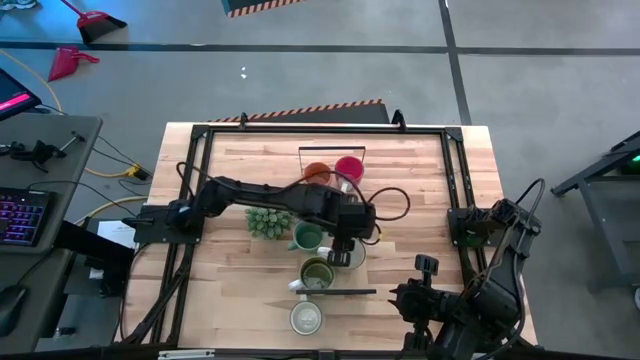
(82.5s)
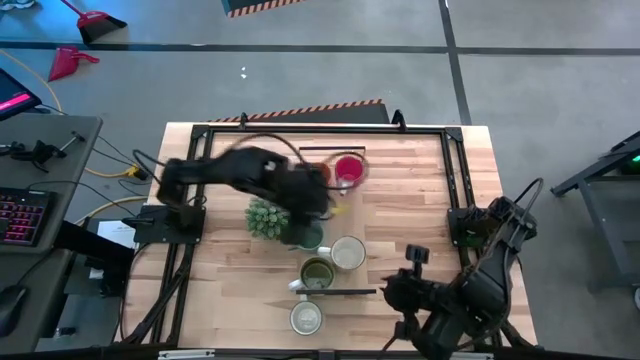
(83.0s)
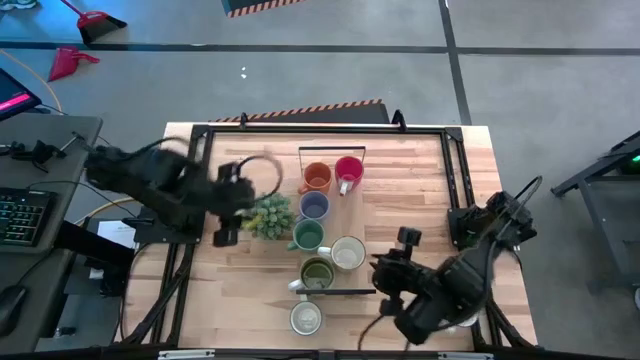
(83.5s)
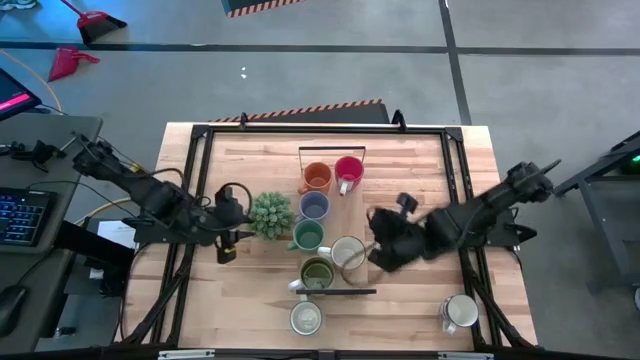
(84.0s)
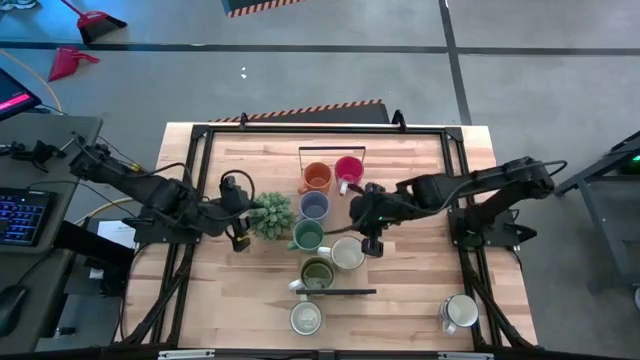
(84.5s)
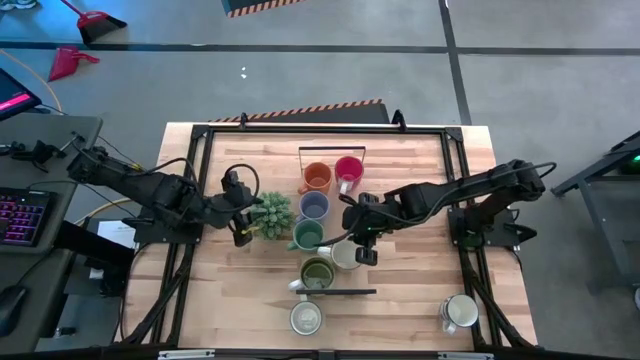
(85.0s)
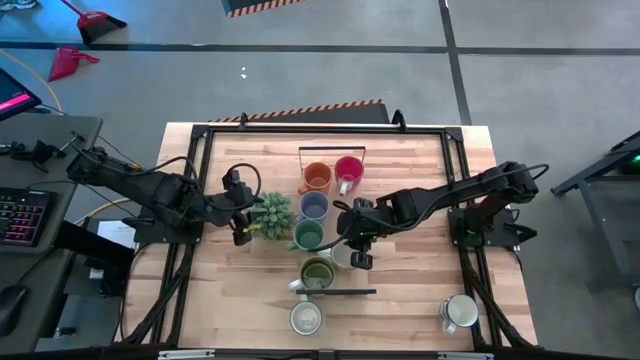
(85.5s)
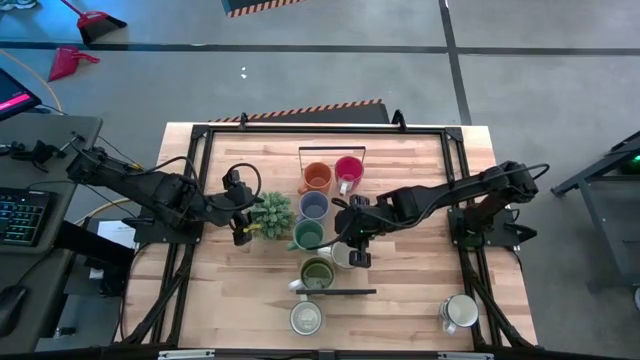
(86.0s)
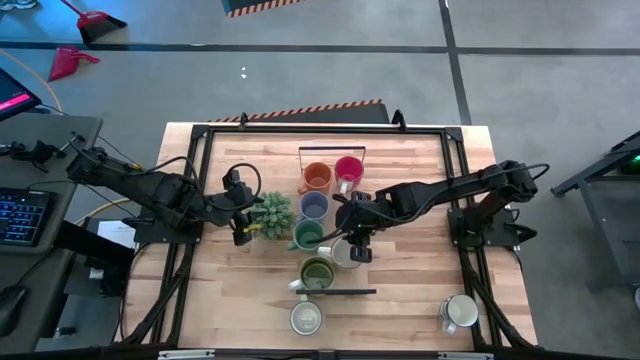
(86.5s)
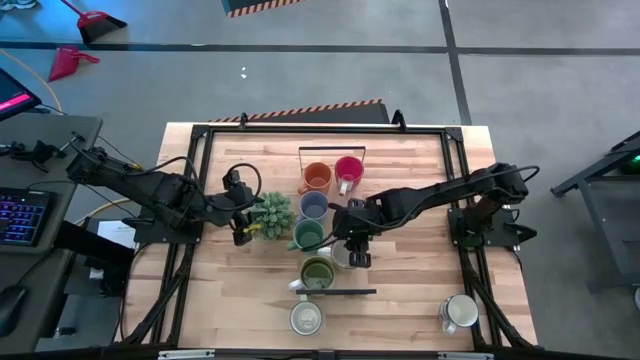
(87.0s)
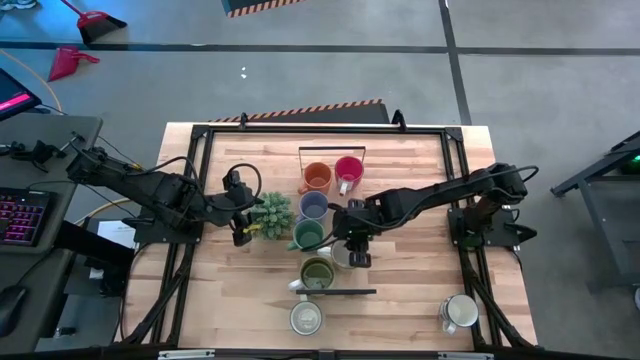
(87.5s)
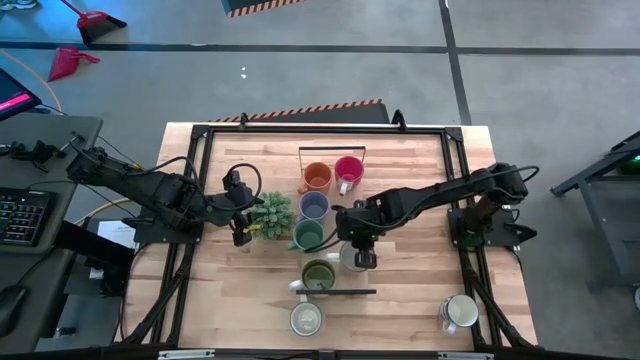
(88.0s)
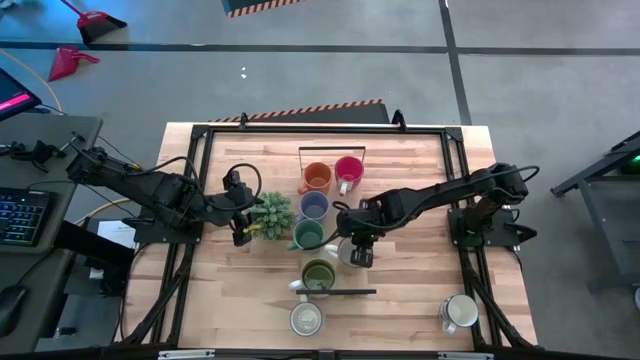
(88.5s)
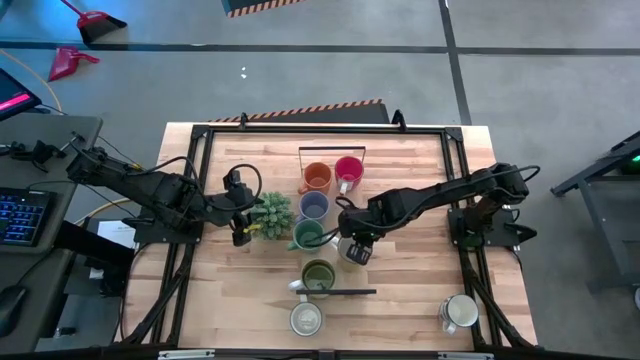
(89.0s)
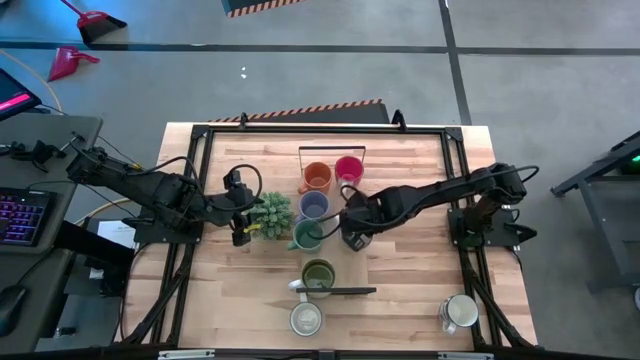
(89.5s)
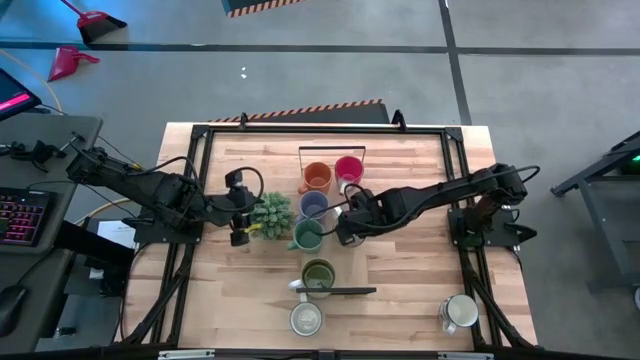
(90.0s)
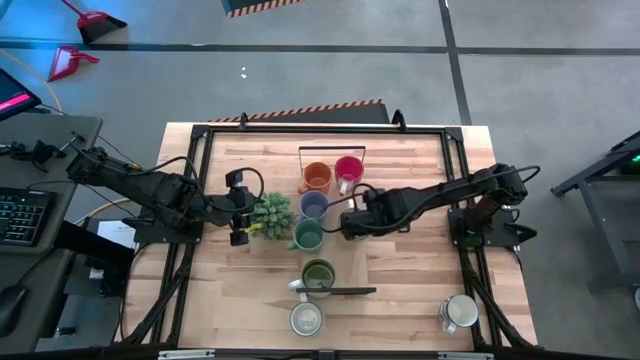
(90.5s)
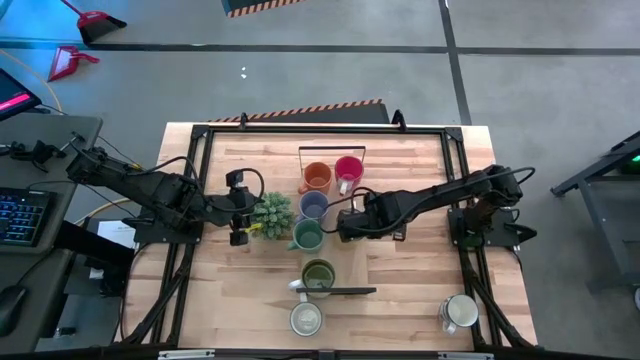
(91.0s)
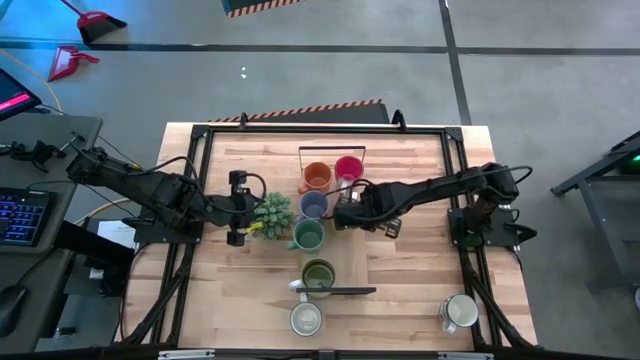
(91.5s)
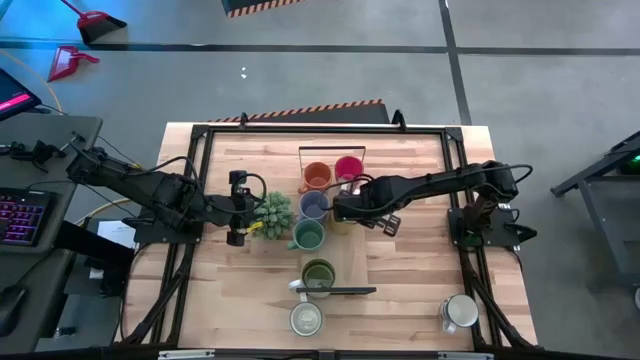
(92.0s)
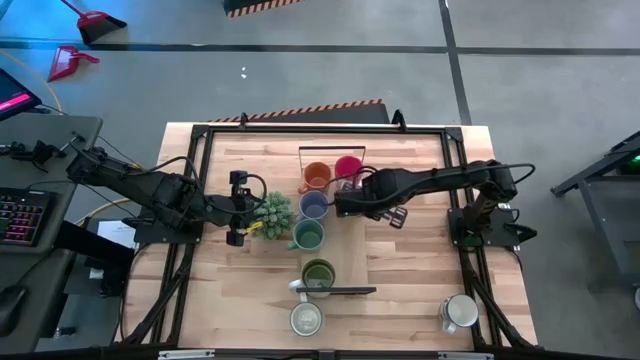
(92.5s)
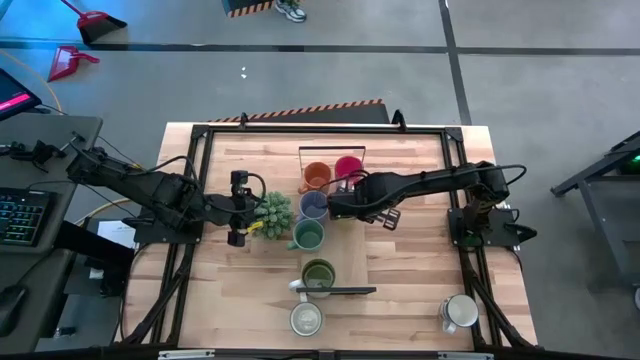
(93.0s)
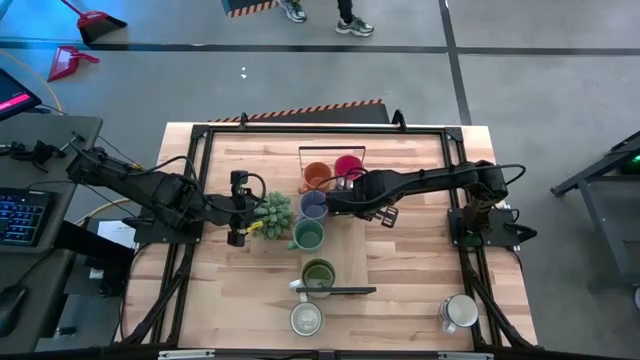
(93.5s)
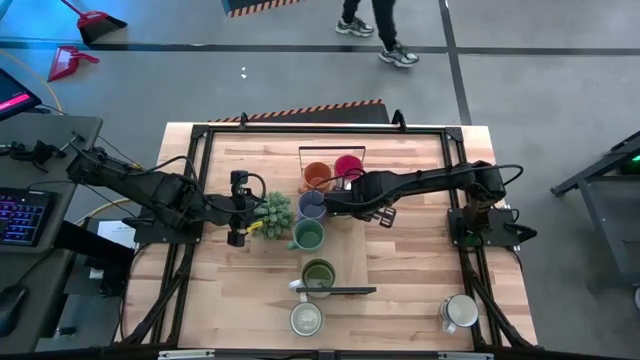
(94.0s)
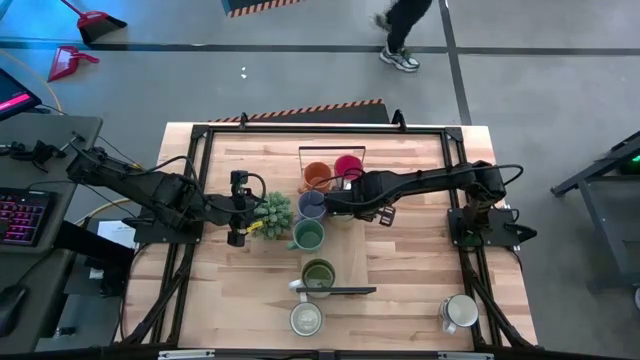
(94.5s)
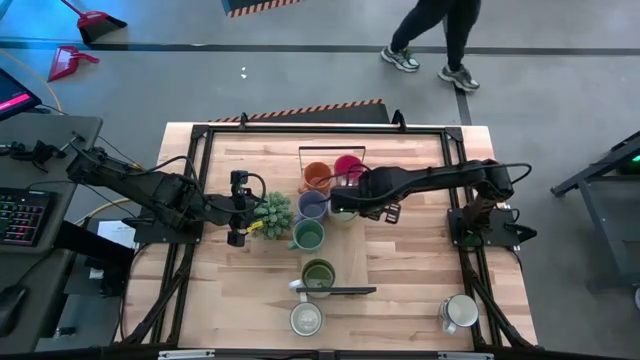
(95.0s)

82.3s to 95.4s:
Task: Place coffee mugs
Put the yellow mug on the shelf

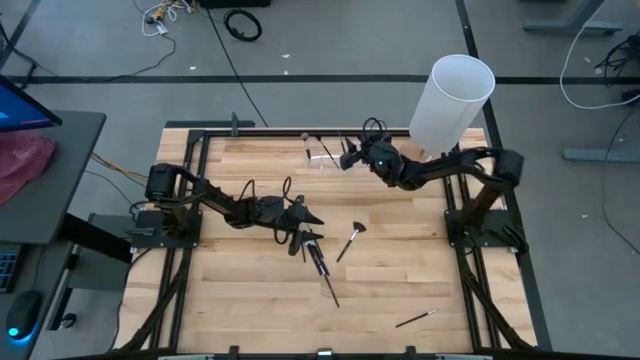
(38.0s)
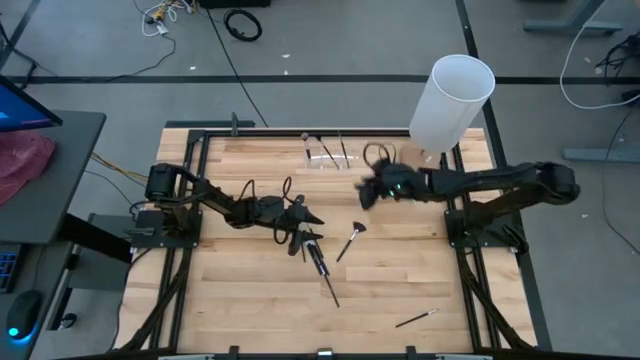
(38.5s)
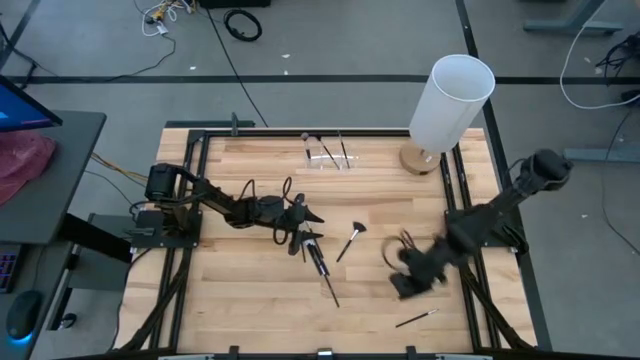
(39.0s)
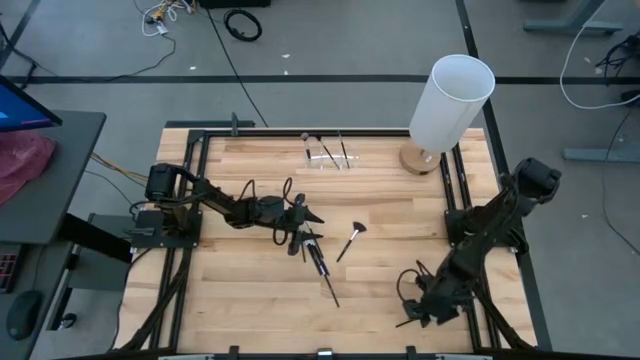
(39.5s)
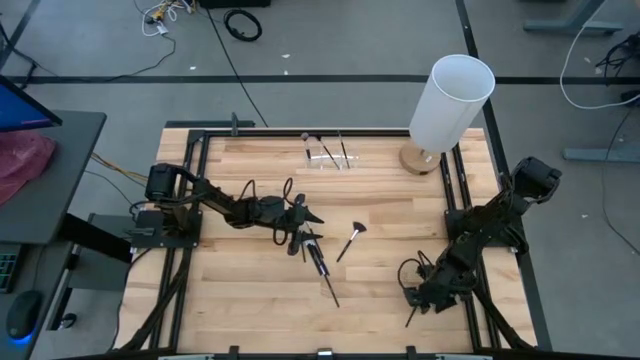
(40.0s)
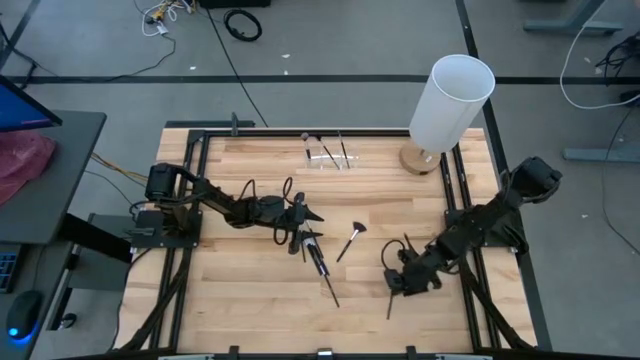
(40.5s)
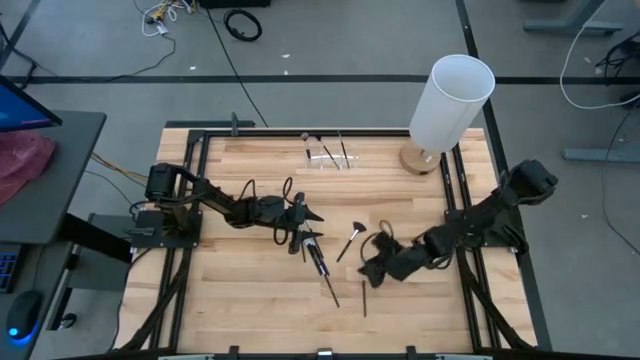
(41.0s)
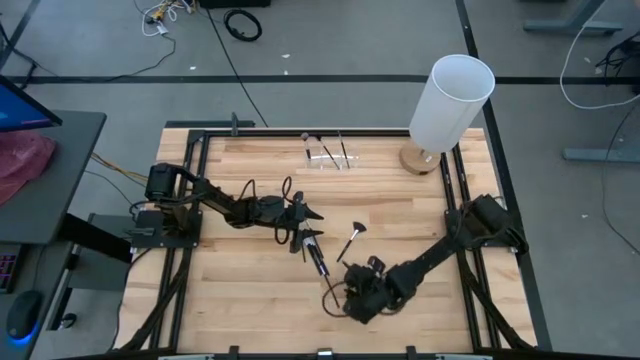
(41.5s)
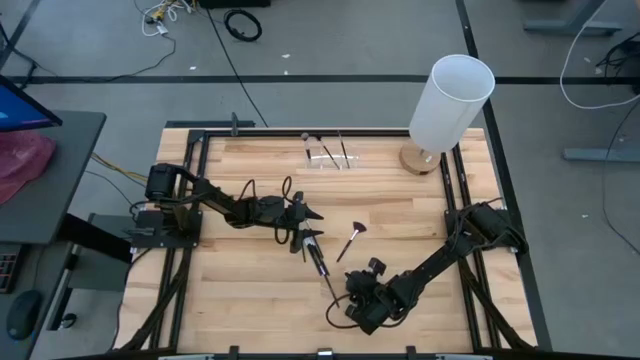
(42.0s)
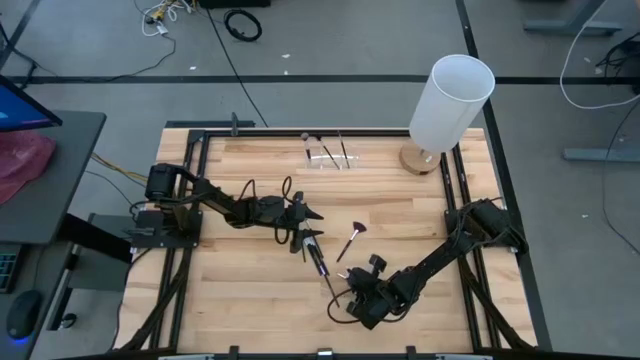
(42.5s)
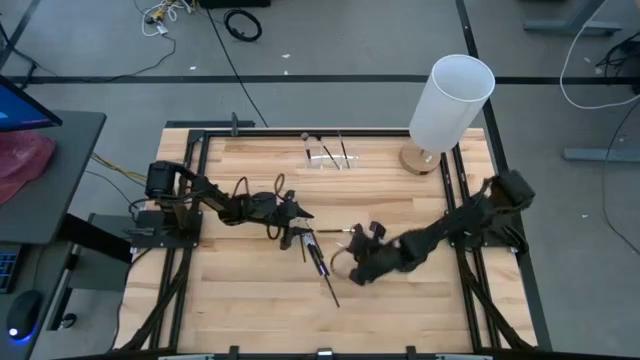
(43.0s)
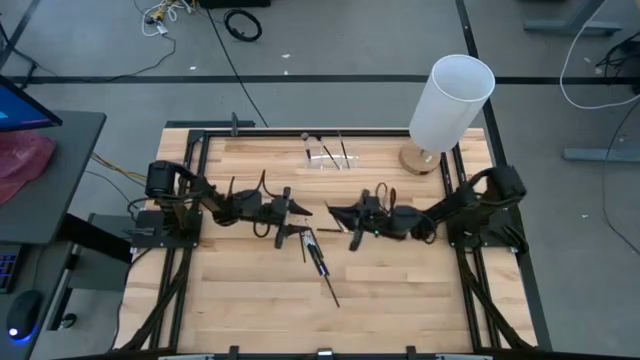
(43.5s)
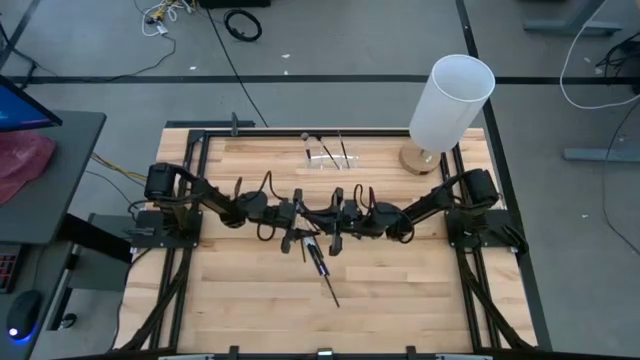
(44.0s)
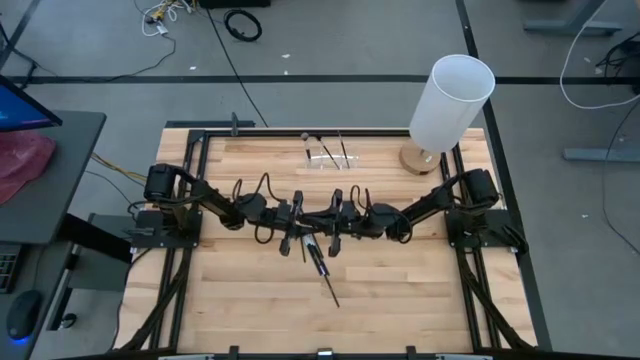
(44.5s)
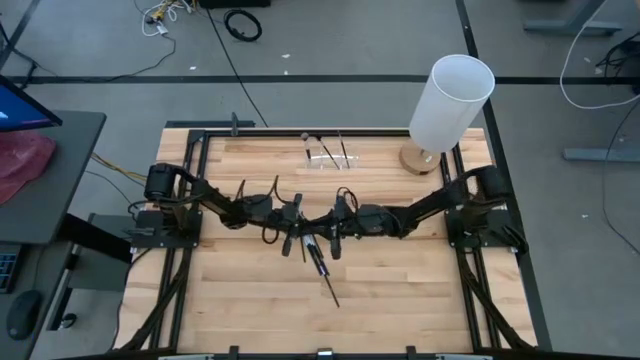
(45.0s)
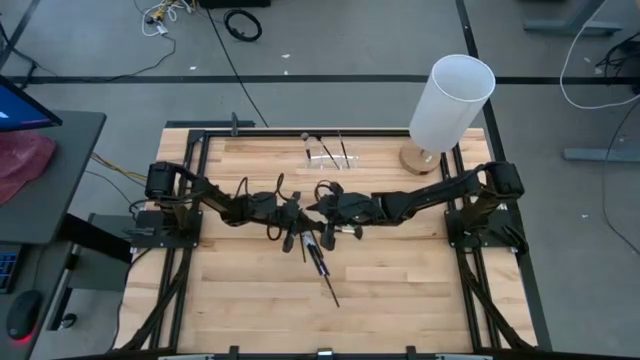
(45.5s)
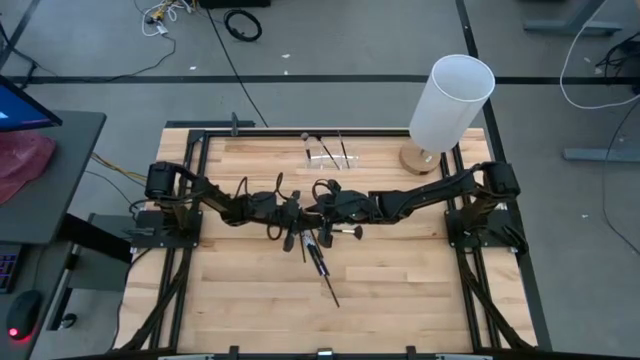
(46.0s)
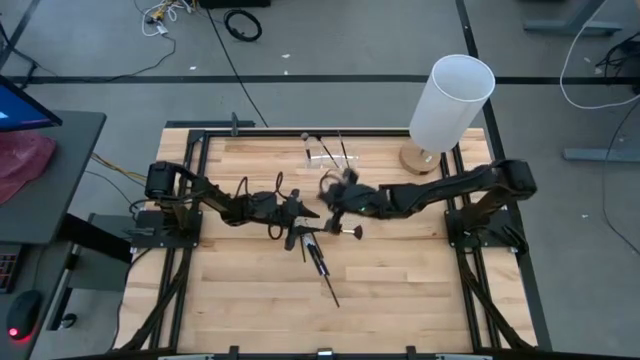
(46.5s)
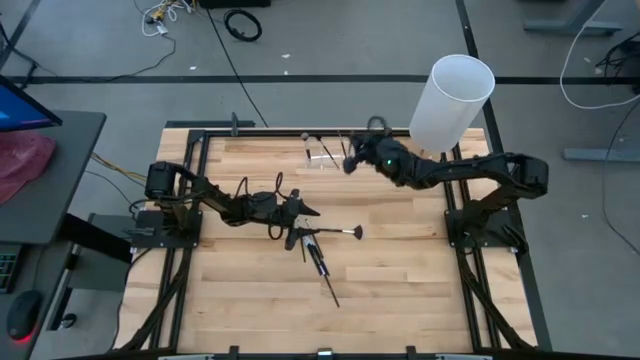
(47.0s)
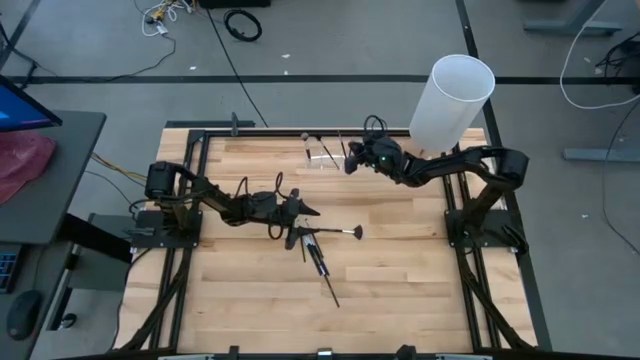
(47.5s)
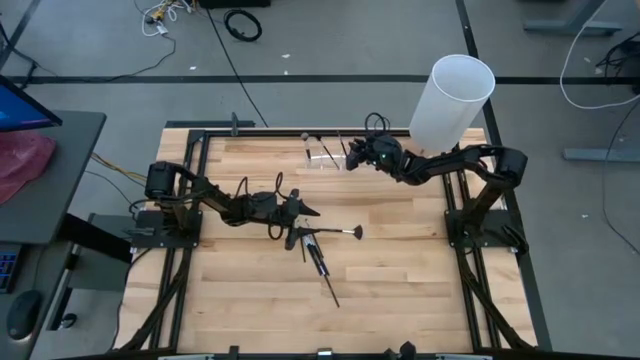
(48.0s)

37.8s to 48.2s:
Task: Pick & Place Makeup Supplies
Put the black makeup brush into the transparent organizer
